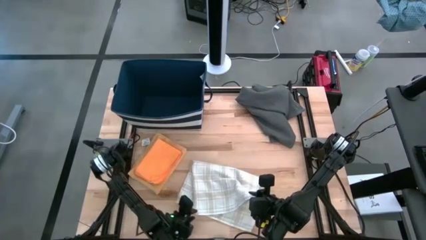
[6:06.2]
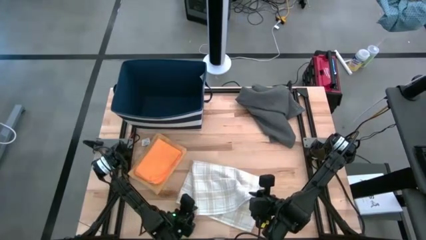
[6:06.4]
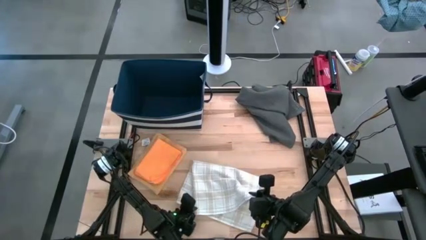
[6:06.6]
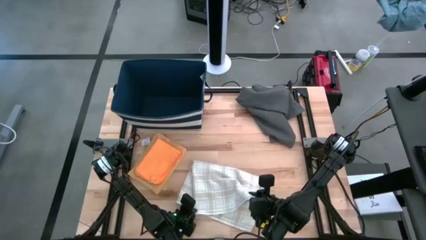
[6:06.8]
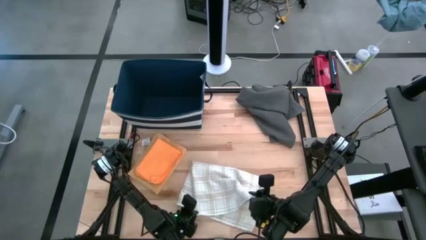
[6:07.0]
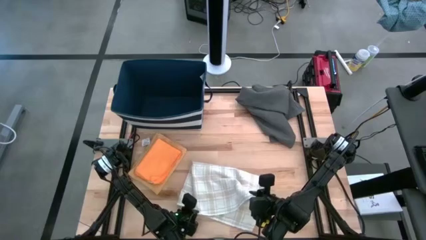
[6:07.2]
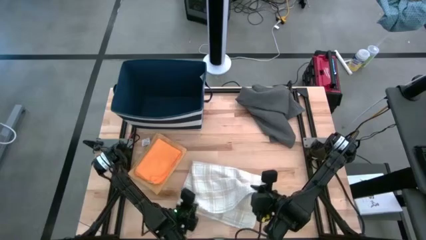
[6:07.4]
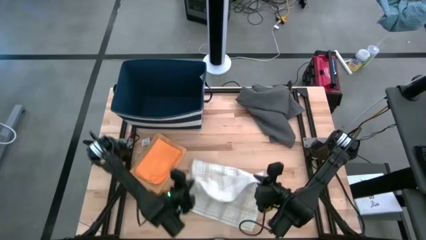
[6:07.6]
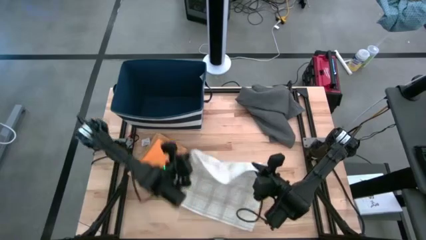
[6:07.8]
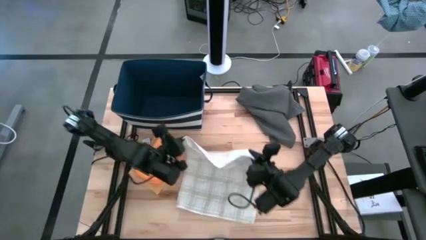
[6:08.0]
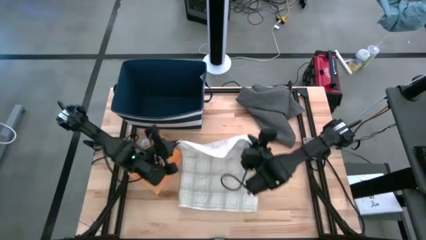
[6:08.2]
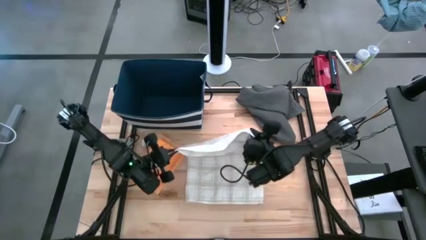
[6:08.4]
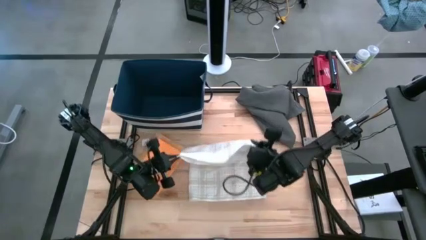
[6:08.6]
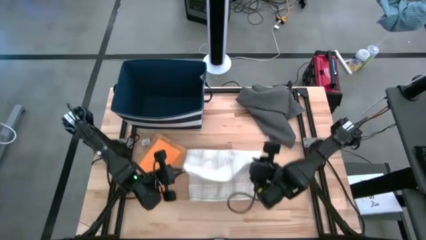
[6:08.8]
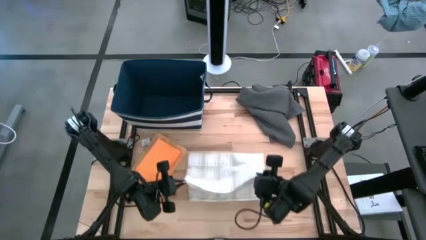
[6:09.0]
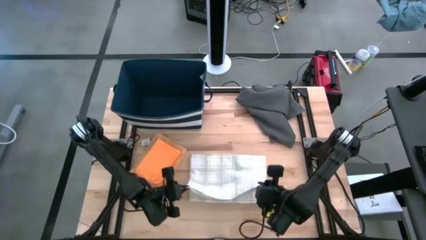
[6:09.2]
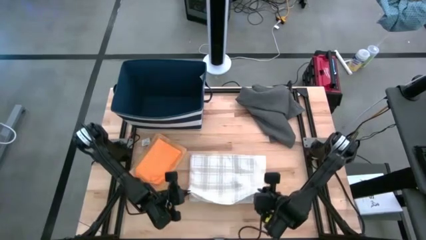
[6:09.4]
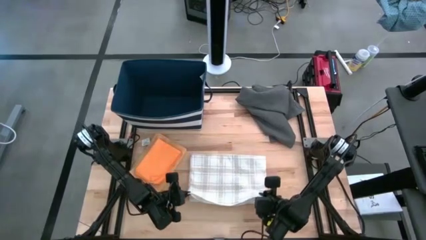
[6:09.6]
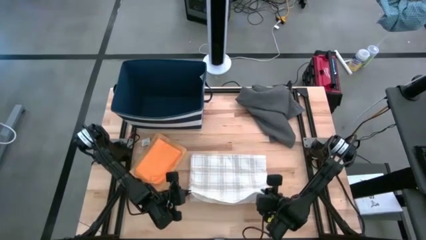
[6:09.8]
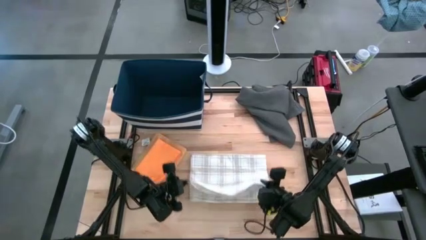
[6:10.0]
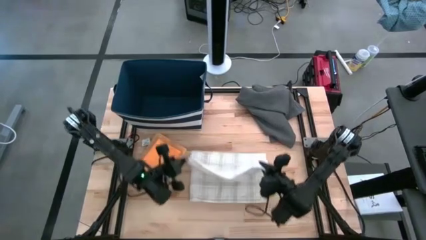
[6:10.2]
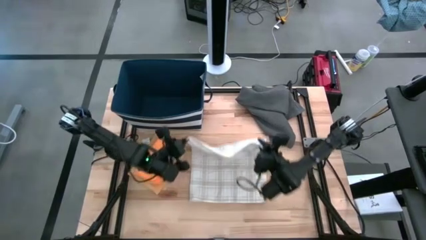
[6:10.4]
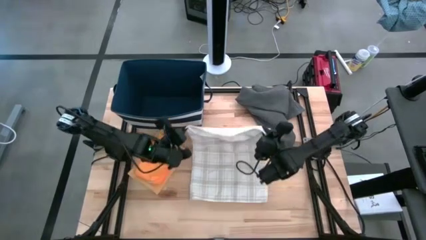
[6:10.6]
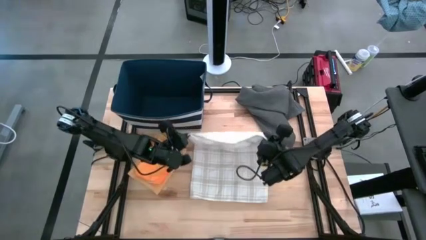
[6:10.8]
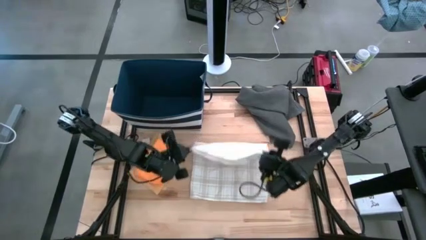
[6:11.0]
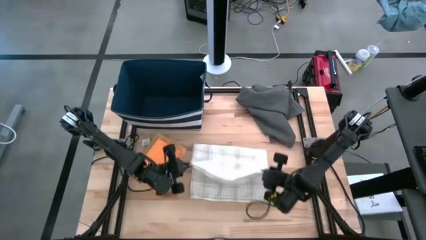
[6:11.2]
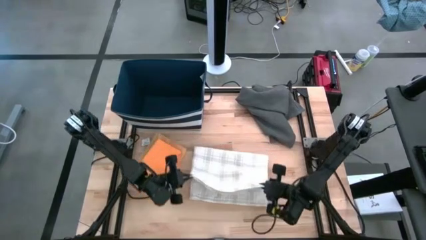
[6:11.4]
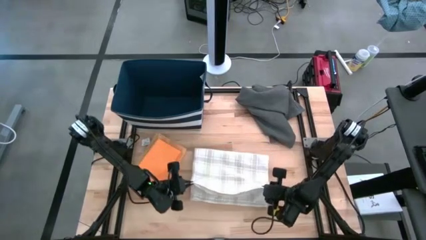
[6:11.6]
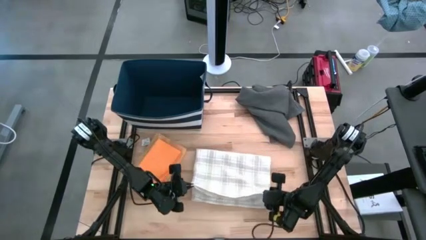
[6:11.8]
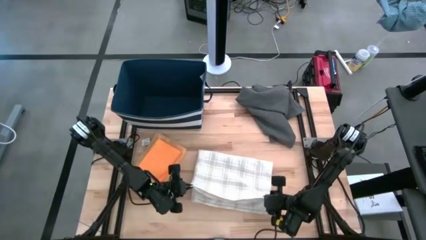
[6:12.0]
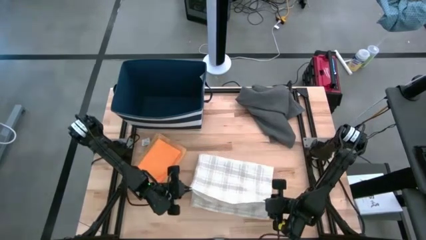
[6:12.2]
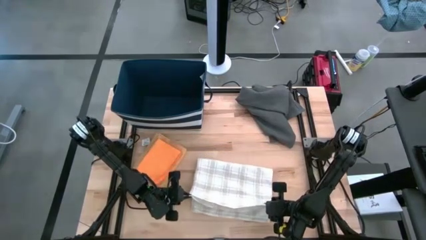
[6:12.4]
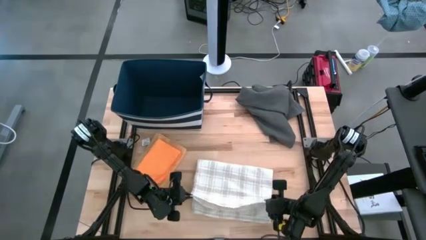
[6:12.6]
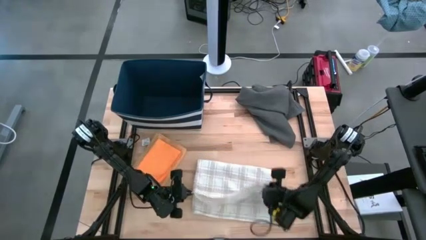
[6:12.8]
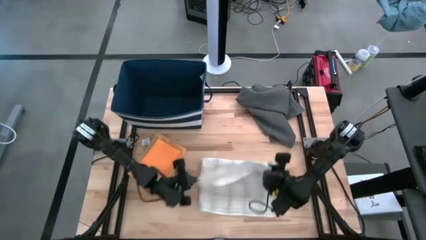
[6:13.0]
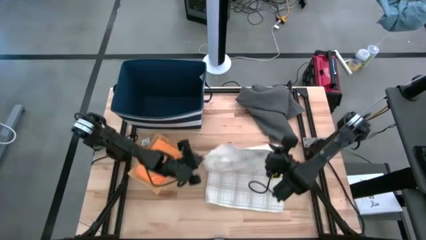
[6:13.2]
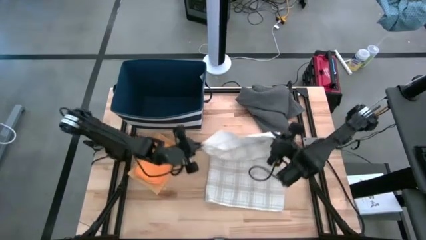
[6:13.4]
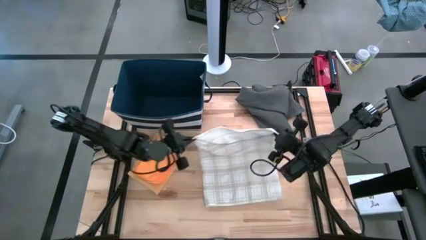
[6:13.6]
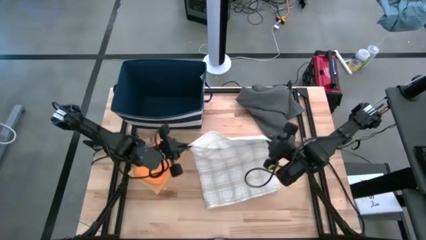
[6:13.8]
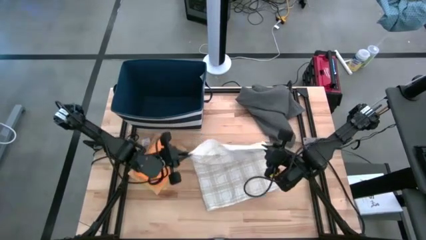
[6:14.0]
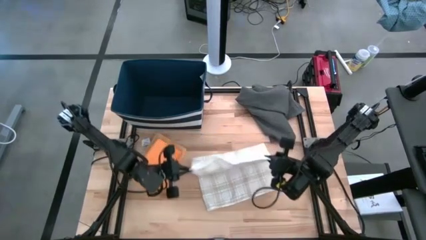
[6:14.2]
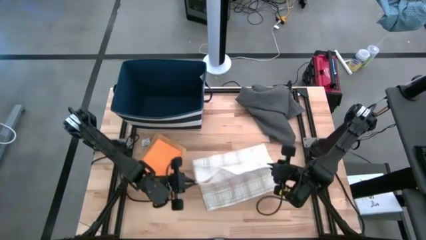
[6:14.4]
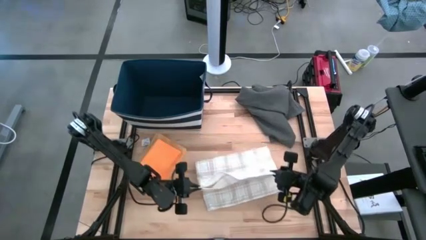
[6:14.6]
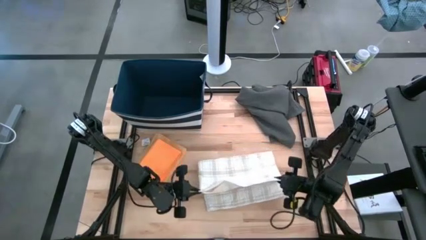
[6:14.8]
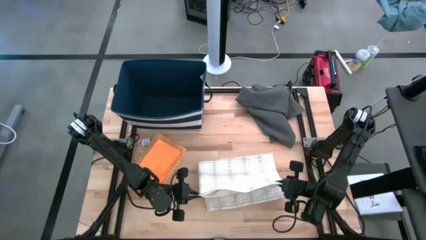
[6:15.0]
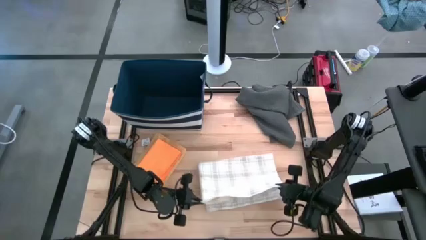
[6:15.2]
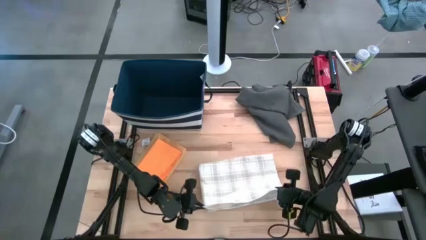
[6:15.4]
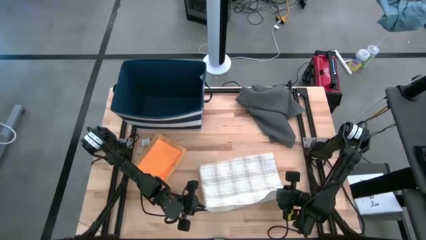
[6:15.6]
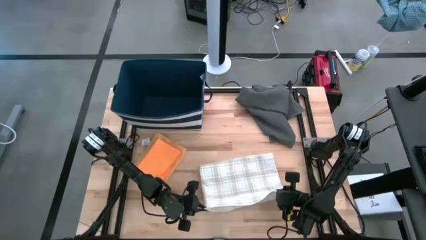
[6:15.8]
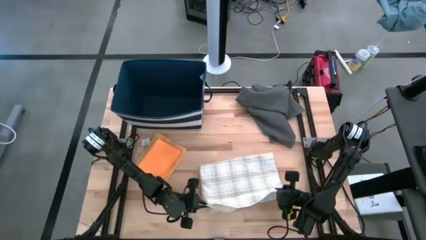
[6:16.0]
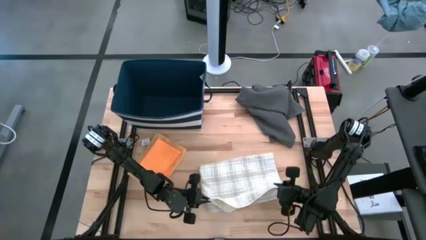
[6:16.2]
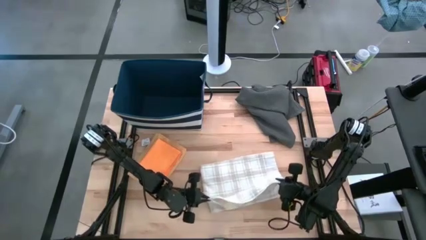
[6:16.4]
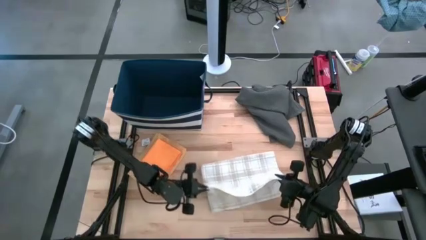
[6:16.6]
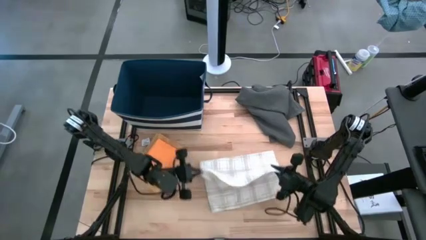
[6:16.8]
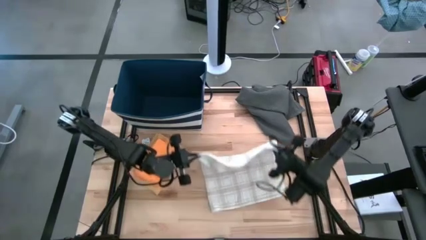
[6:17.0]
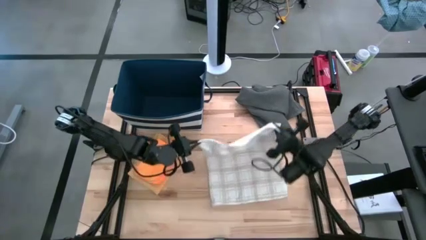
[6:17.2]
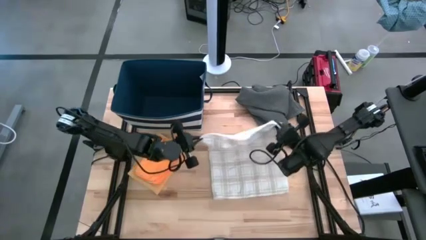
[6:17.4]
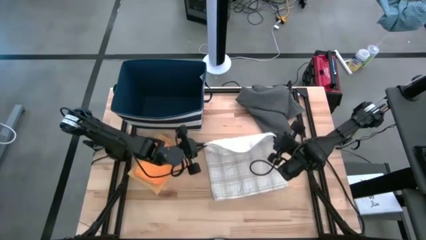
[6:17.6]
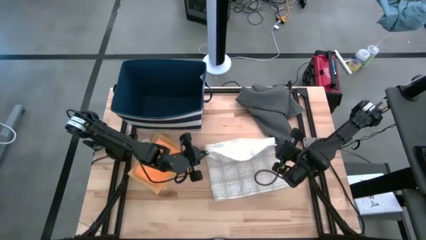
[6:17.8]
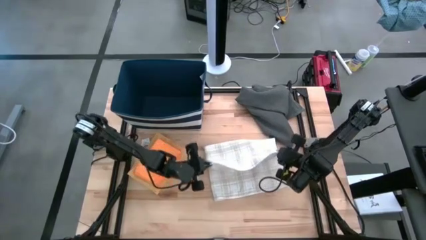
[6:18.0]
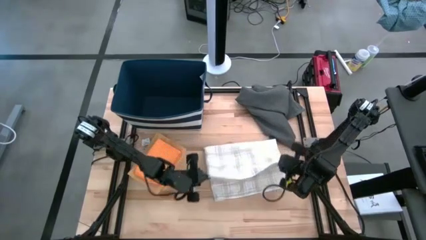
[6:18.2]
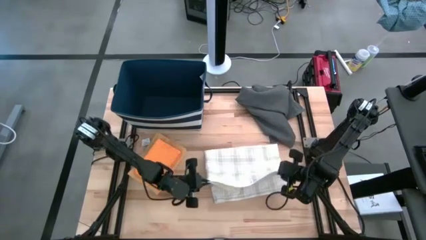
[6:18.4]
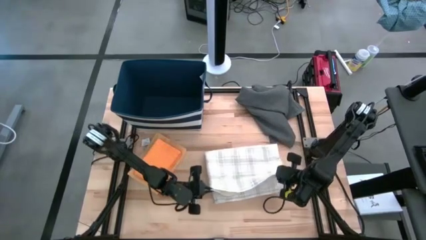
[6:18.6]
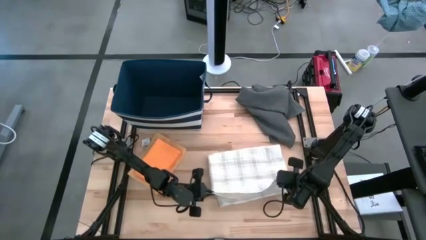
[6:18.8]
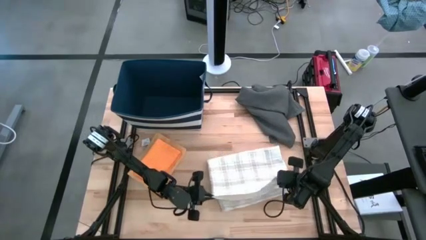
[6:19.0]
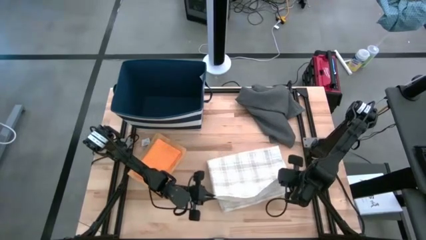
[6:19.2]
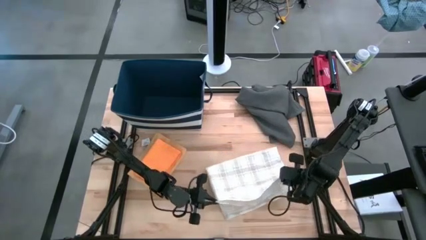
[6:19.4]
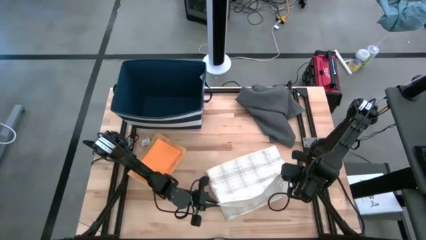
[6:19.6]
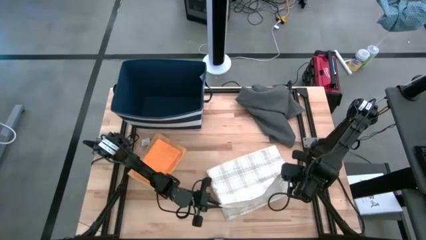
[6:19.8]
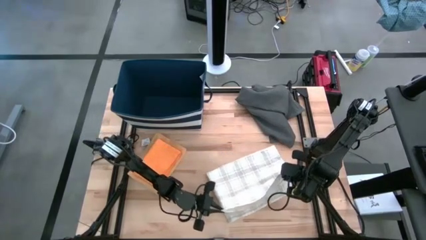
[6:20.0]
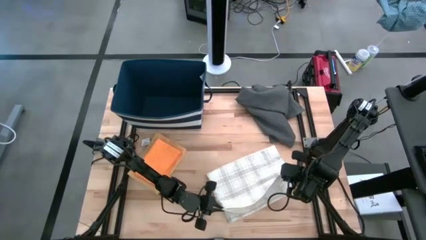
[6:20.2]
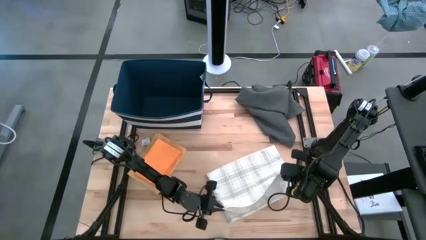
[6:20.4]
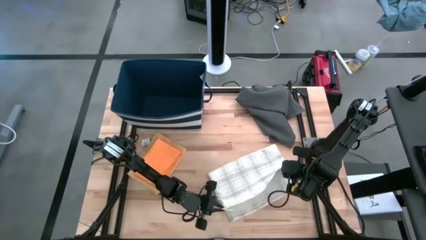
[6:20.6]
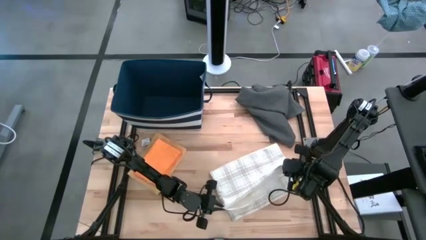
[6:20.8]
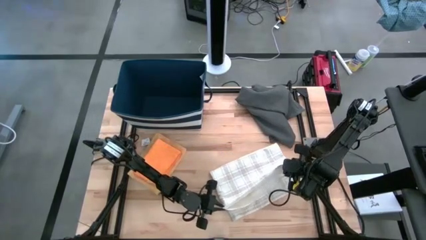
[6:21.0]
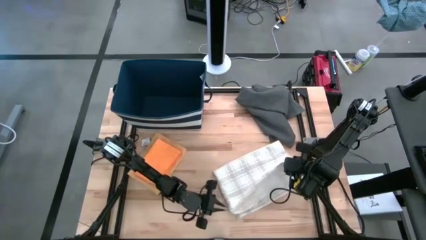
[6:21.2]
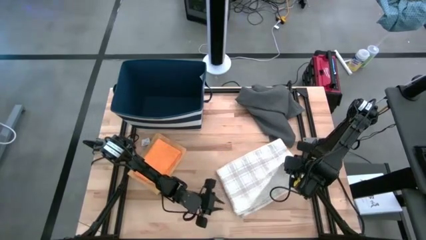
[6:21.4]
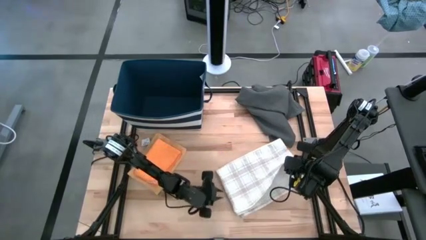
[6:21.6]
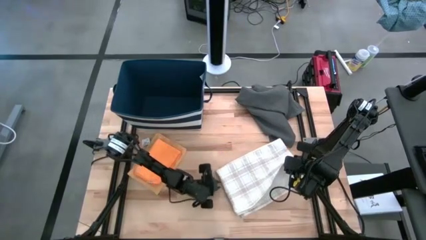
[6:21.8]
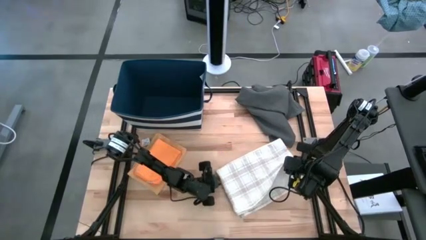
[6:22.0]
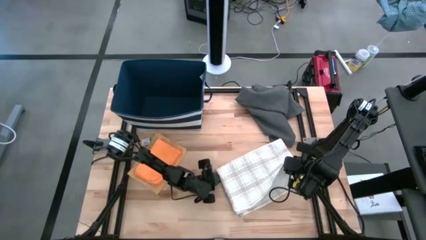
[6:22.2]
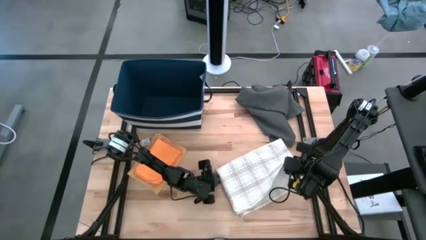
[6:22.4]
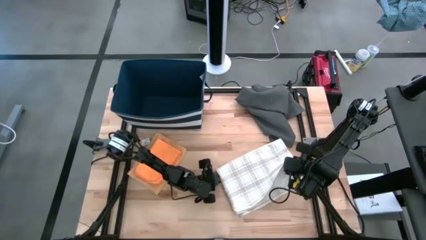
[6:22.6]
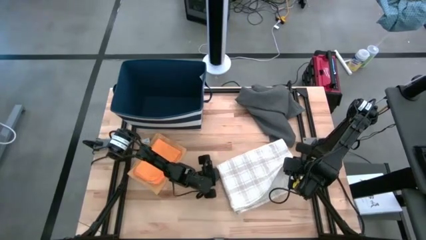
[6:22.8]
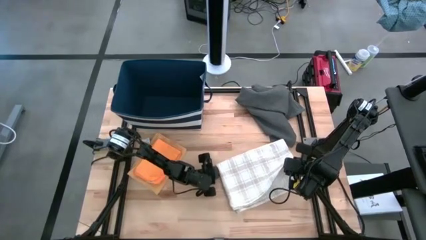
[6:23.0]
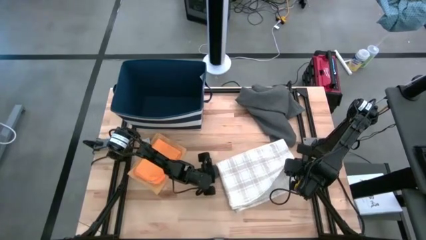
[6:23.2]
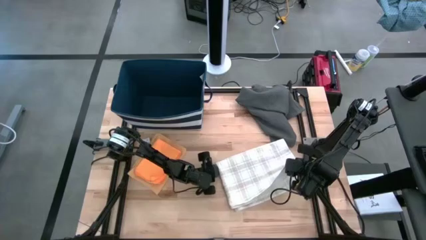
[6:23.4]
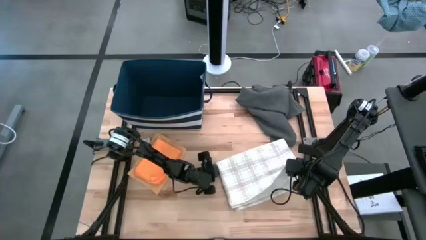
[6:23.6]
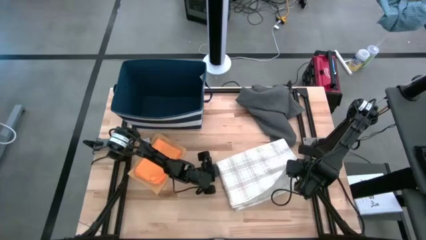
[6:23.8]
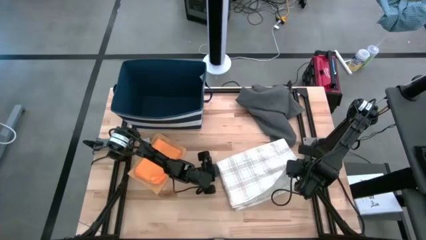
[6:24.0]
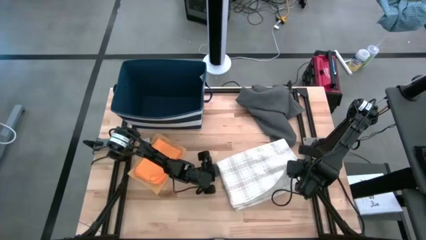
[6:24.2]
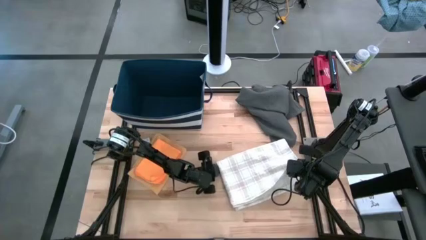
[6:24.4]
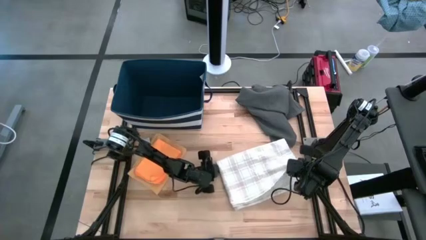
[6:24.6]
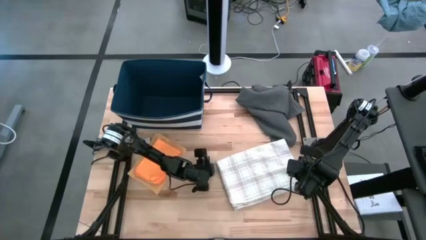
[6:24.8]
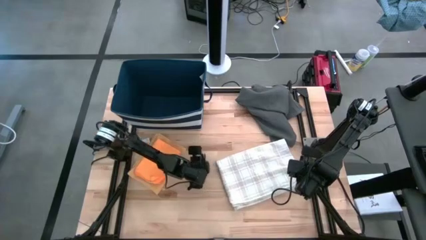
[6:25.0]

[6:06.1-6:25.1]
Task: Fold towel
Fold the white patterned kitchen towel
